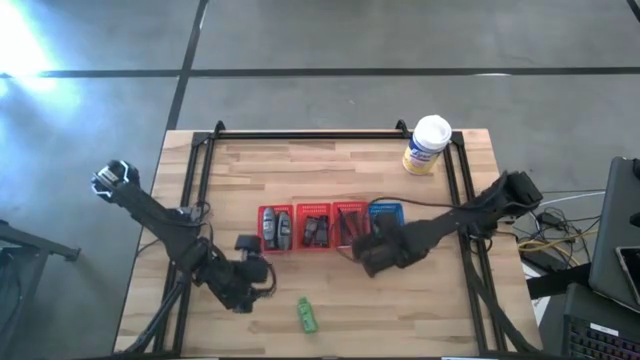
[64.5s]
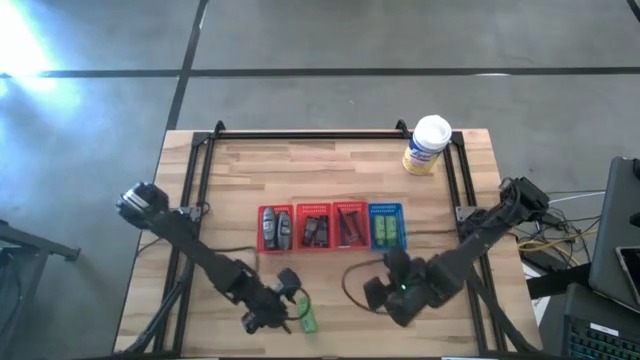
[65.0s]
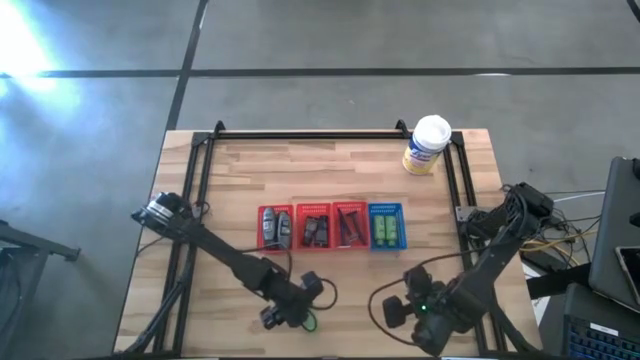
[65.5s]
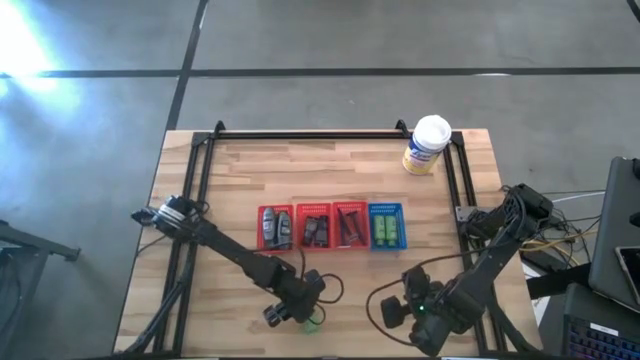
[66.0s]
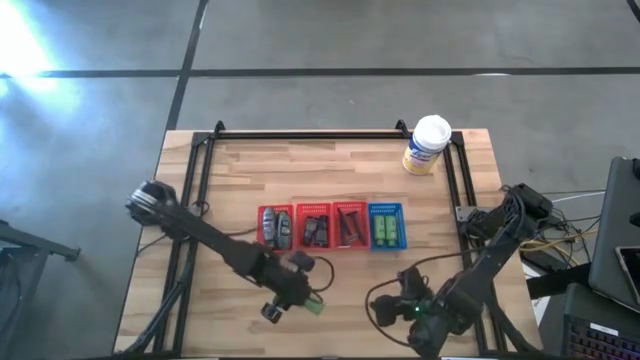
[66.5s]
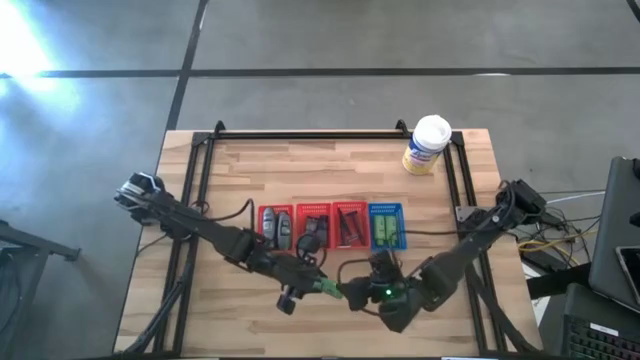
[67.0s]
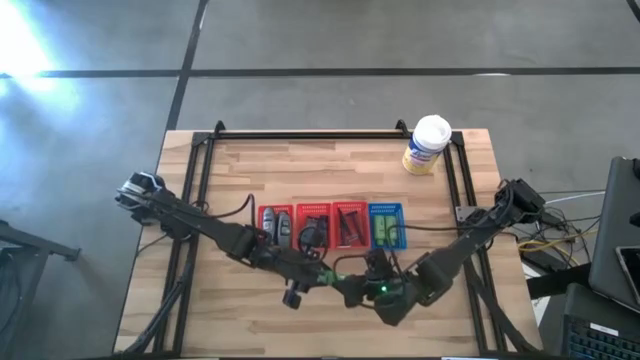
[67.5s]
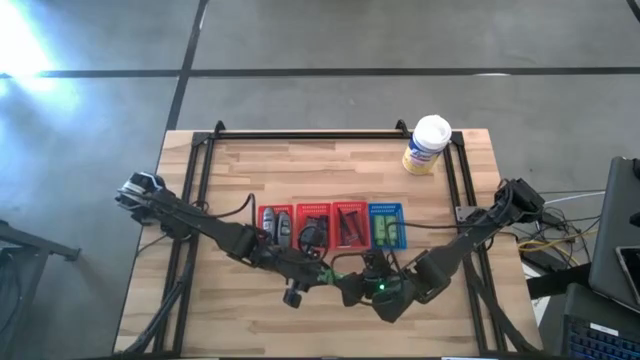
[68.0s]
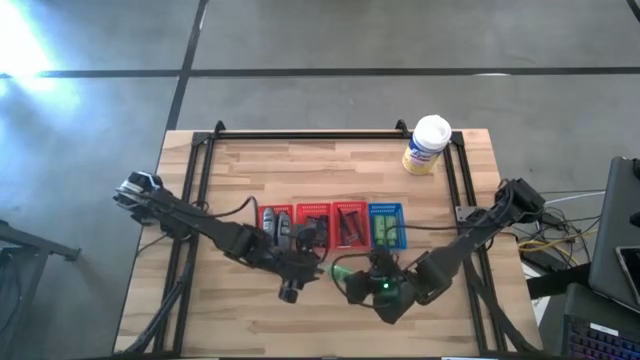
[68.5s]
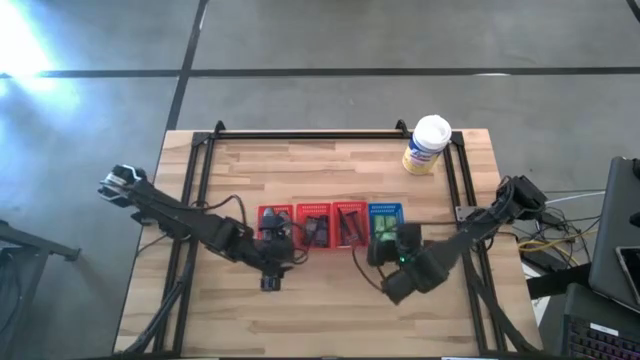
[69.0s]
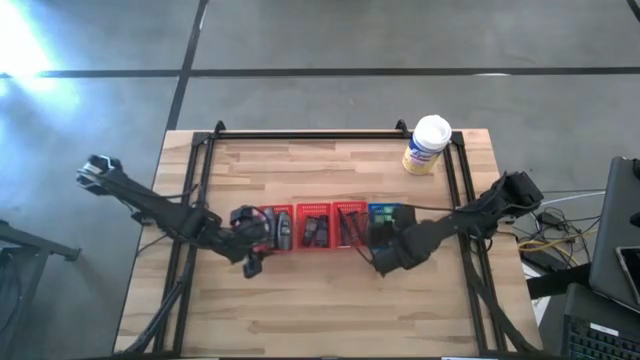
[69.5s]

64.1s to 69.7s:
Task: Pick & Place Travel size toiletries
Put the green shampoo into the blue bin

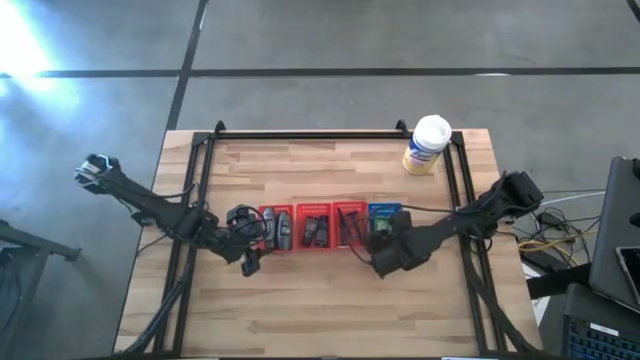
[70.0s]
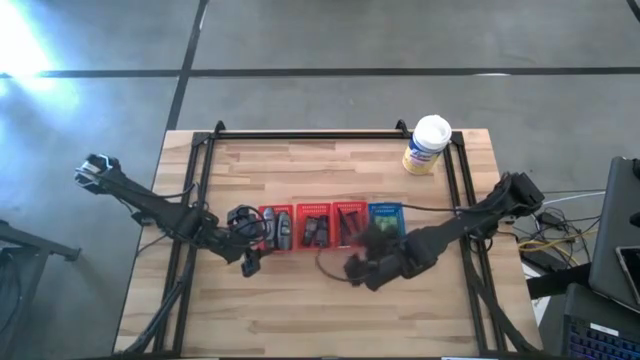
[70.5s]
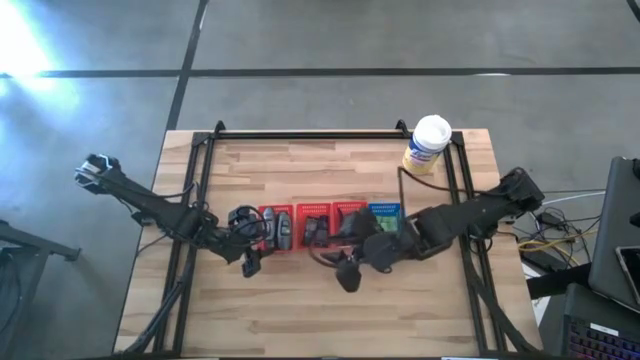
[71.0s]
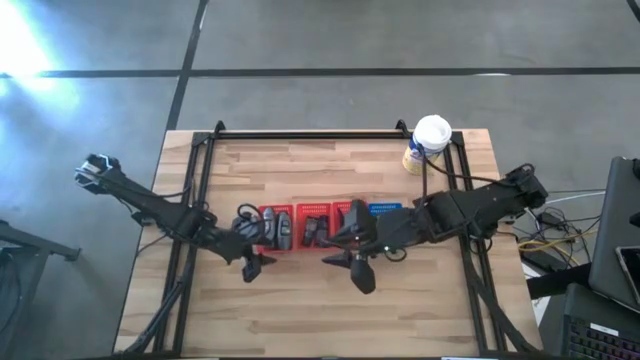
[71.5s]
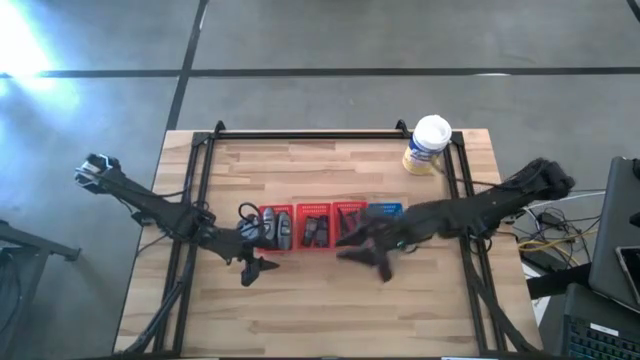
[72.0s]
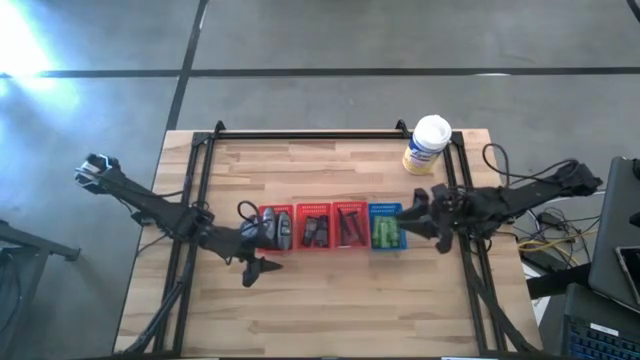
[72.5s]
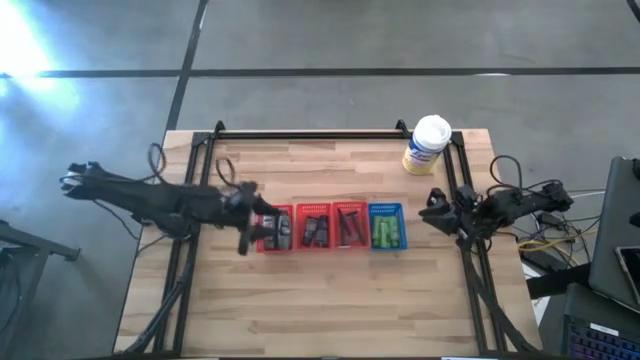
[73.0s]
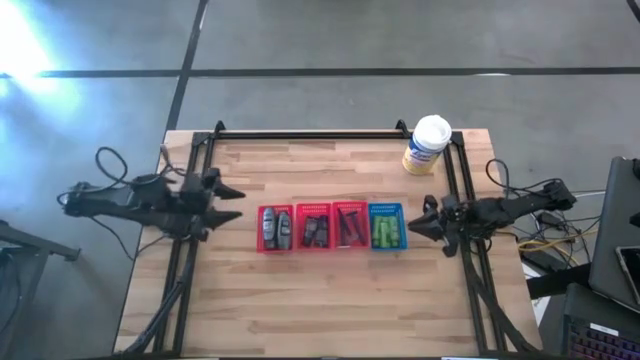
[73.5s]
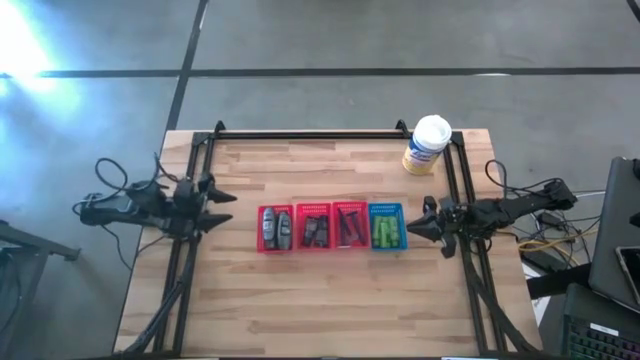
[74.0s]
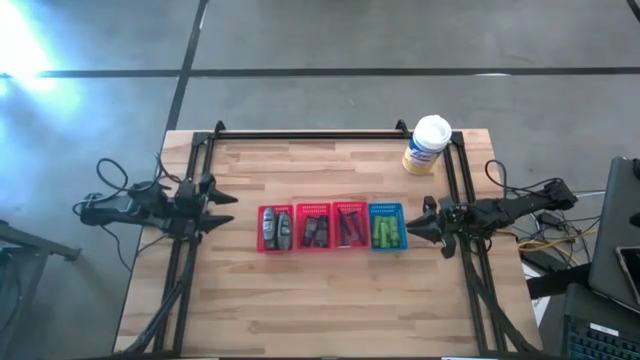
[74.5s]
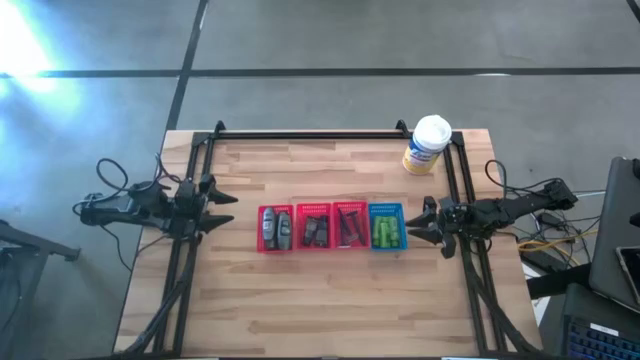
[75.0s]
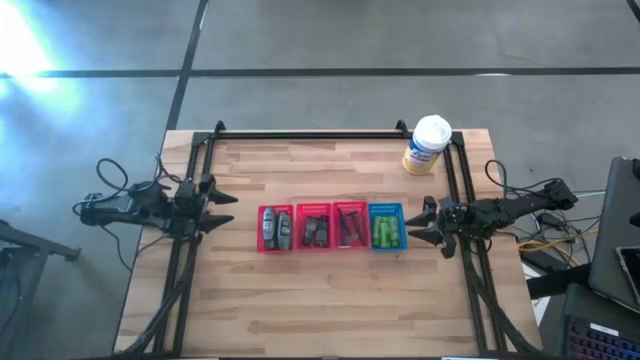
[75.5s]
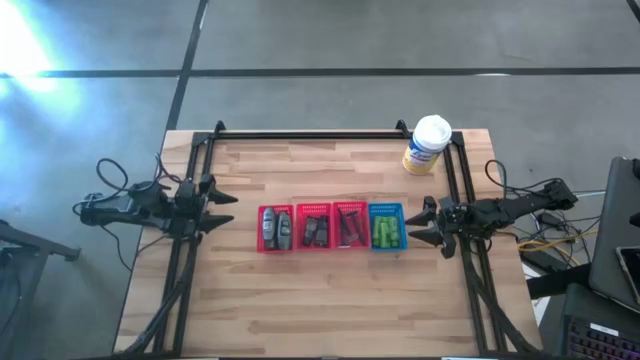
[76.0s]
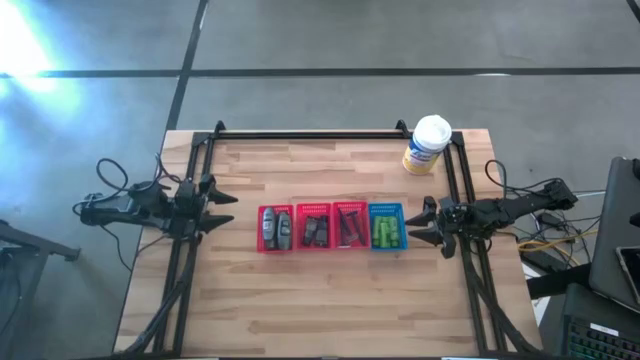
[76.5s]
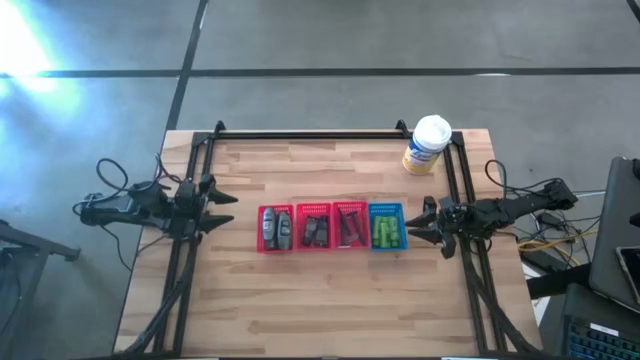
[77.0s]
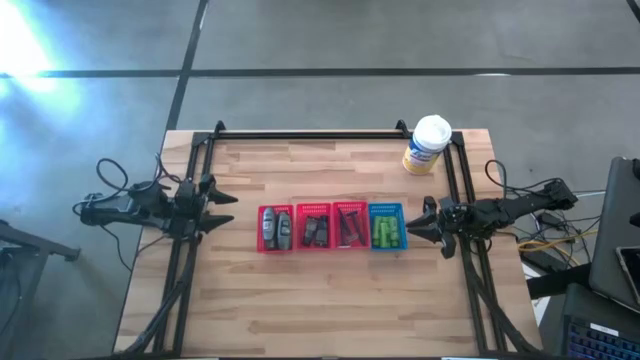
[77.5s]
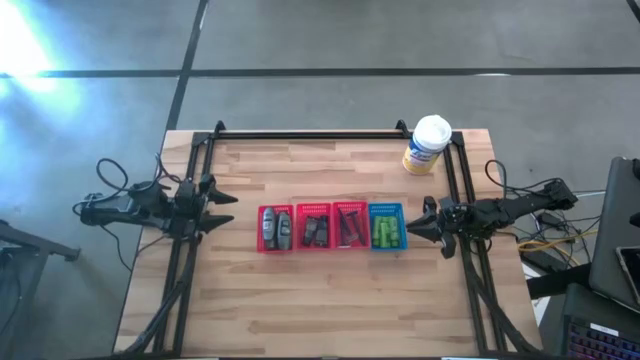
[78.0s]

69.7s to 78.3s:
Return to Home Position

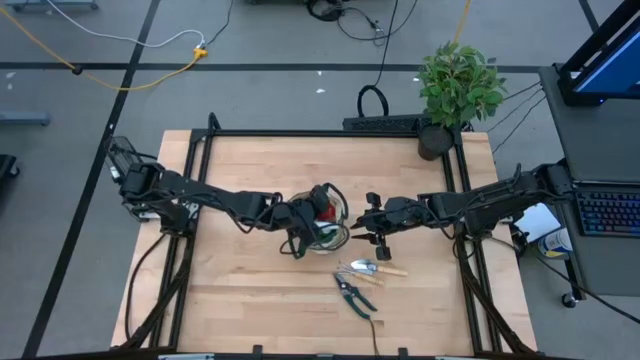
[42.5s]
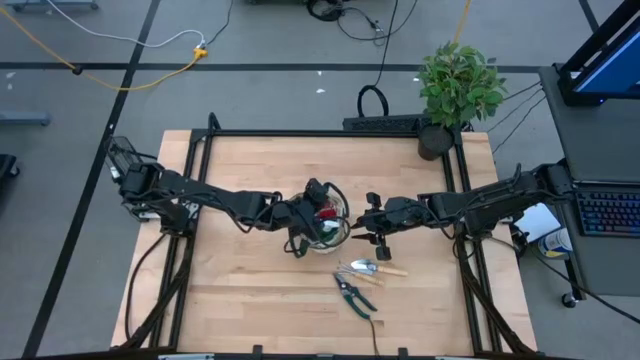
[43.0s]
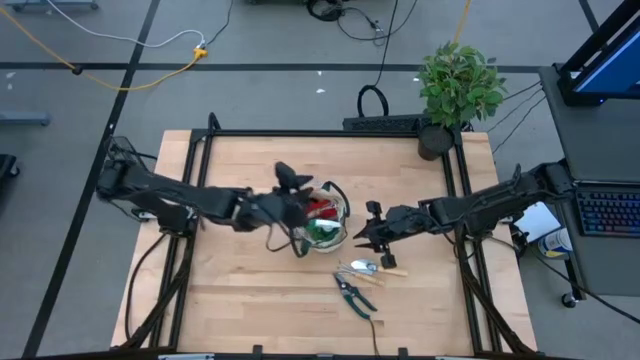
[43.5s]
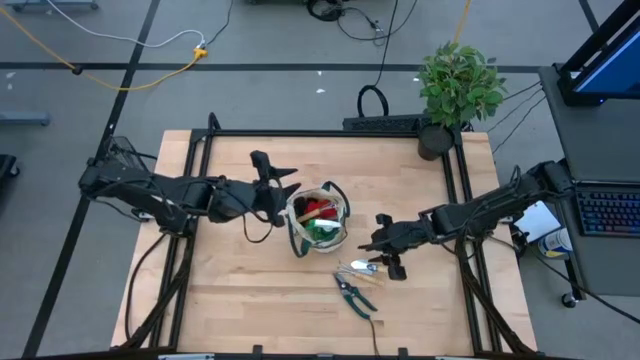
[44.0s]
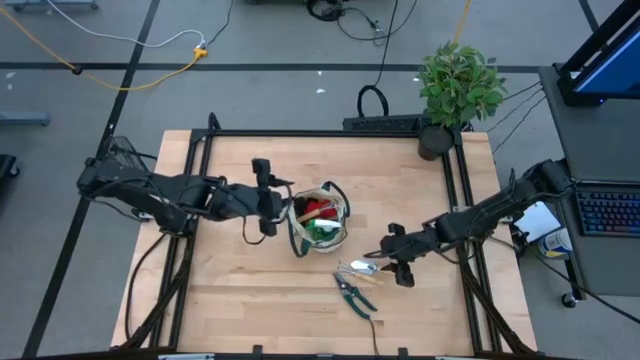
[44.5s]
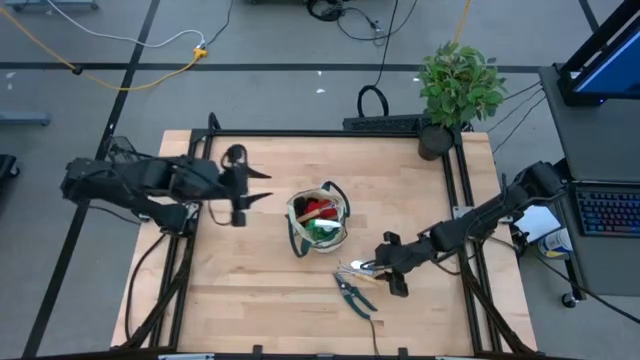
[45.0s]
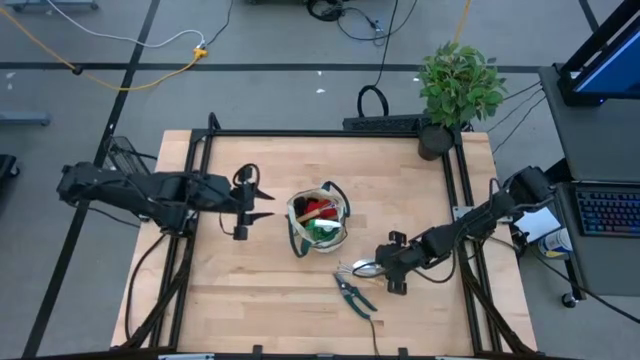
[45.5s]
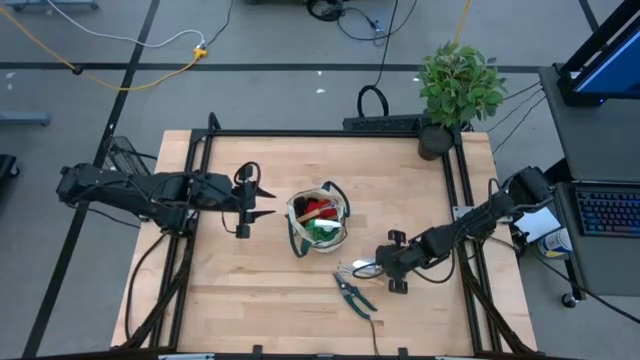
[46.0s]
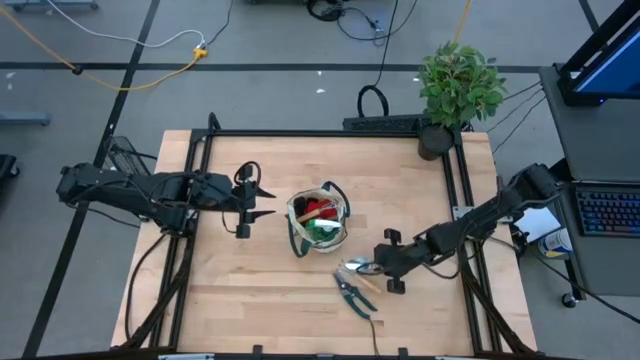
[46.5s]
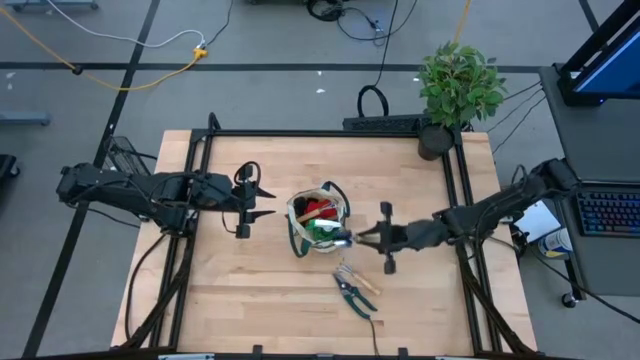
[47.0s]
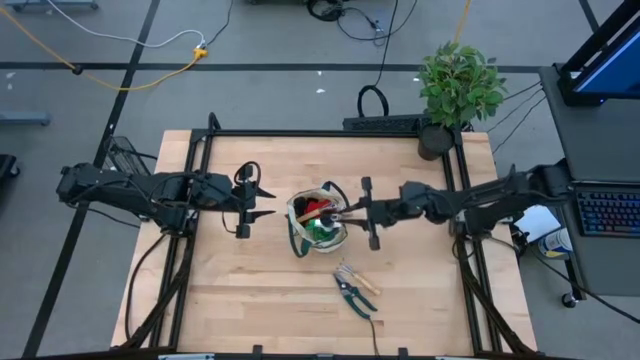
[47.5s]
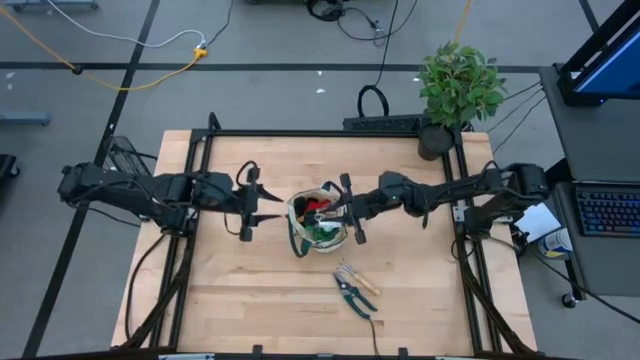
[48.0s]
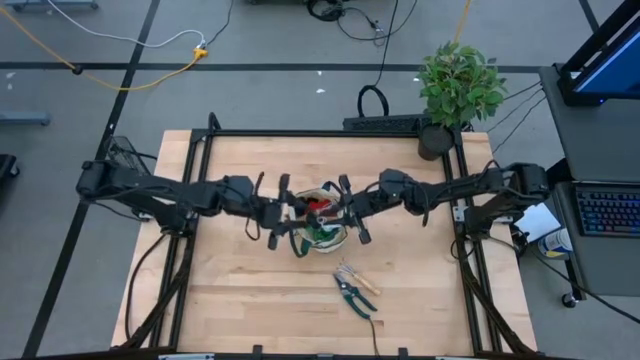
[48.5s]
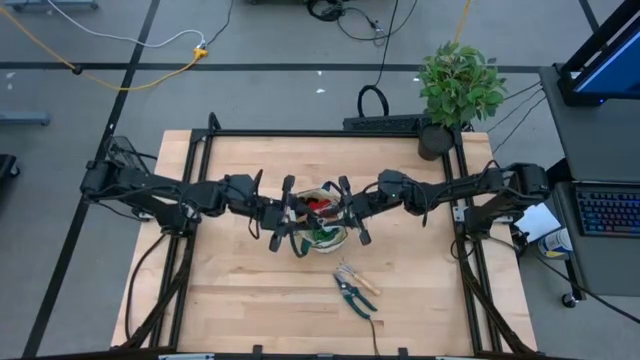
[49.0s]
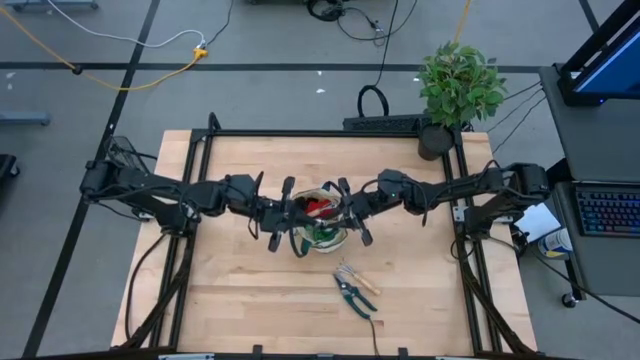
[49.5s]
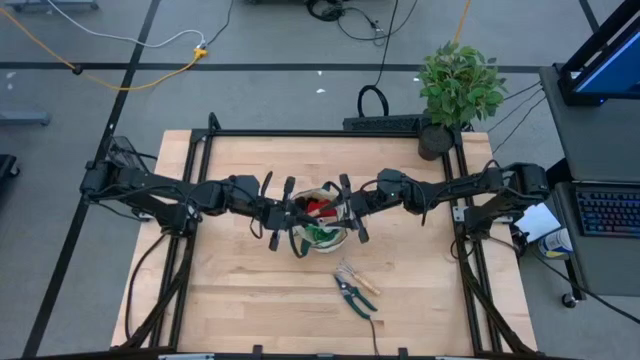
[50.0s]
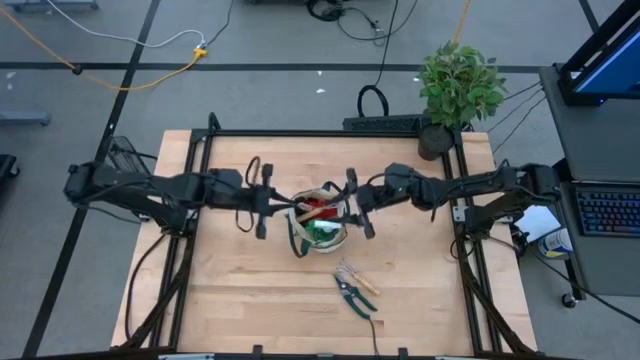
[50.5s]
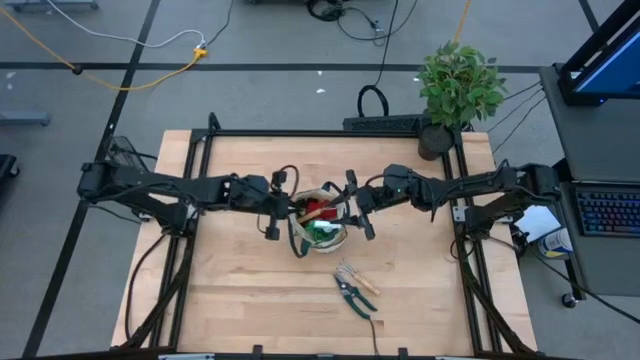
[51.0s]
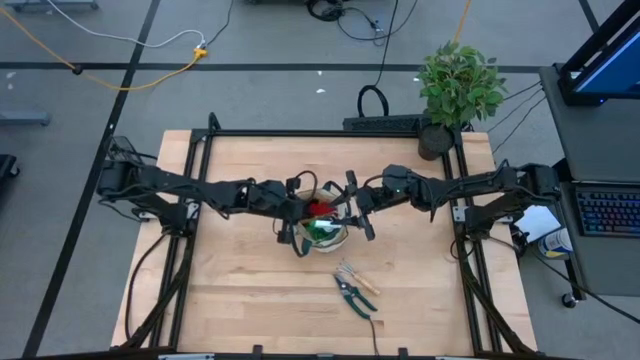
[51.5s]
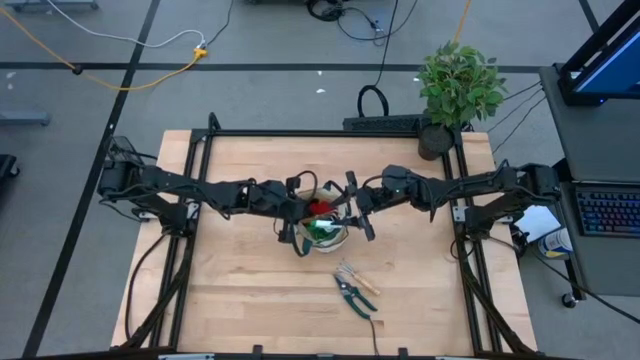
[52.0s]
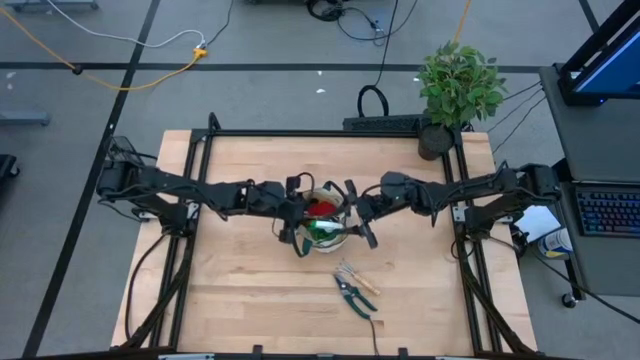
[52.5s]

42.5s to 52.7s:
Task: Pick & Place Garden tools in Gardening bag
Put the brown trowel into the white gardening bag
